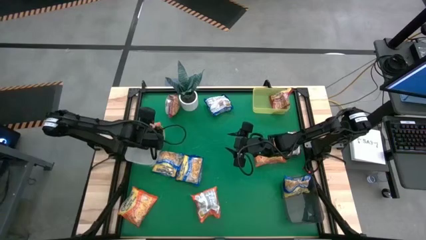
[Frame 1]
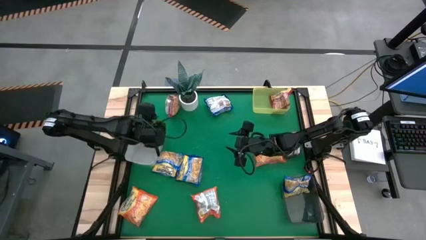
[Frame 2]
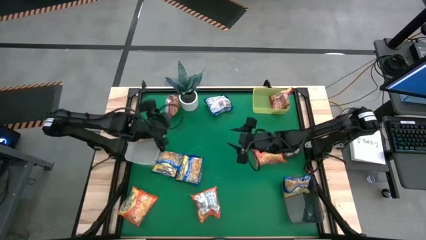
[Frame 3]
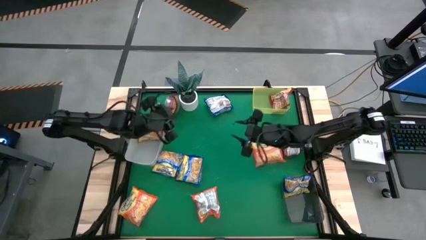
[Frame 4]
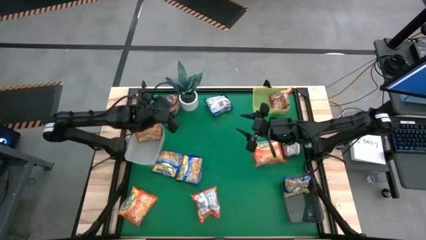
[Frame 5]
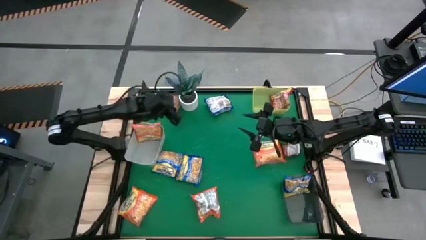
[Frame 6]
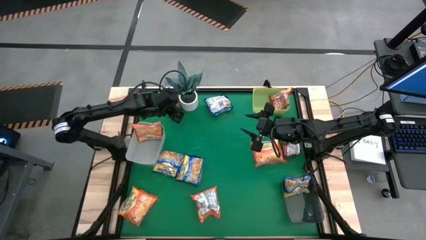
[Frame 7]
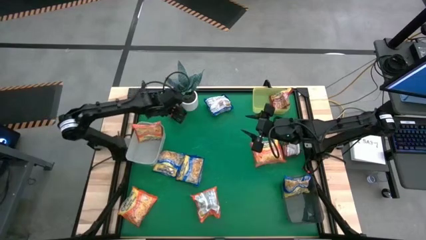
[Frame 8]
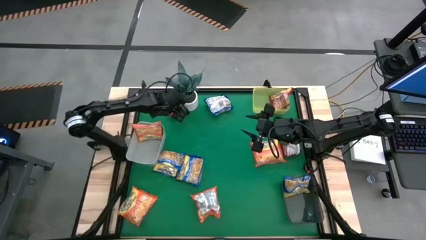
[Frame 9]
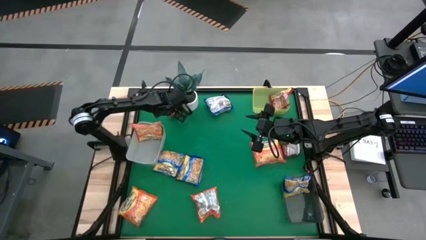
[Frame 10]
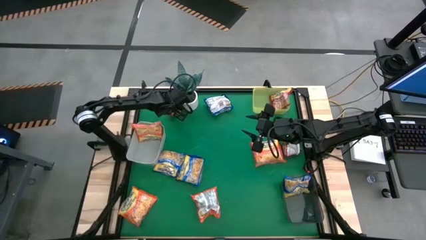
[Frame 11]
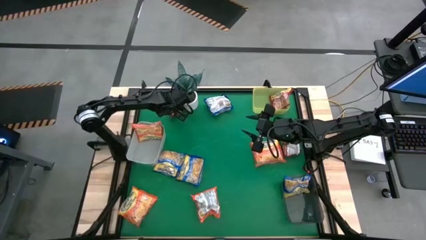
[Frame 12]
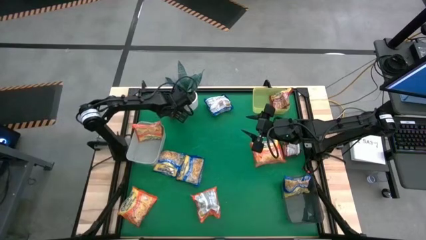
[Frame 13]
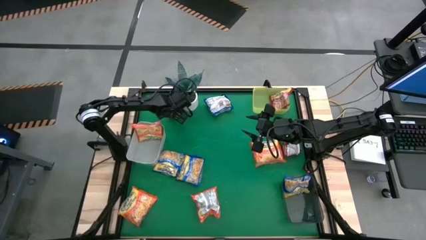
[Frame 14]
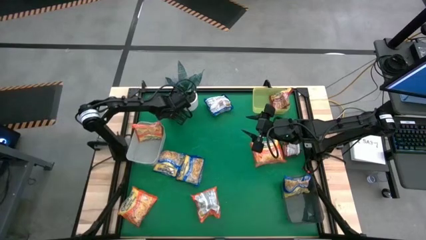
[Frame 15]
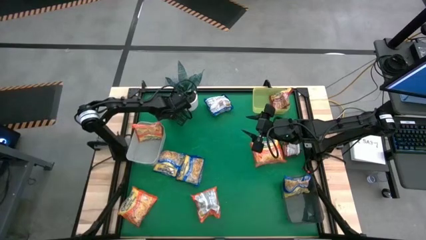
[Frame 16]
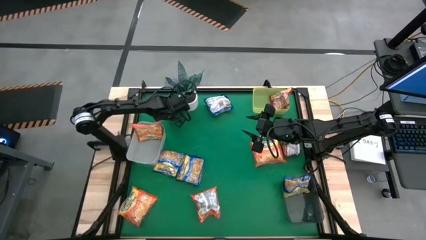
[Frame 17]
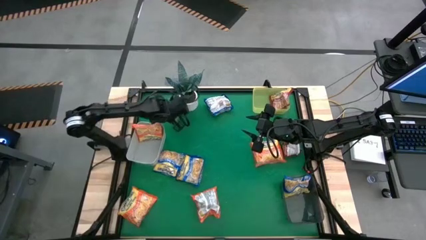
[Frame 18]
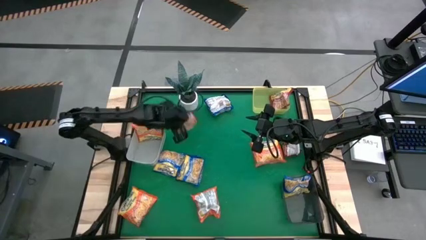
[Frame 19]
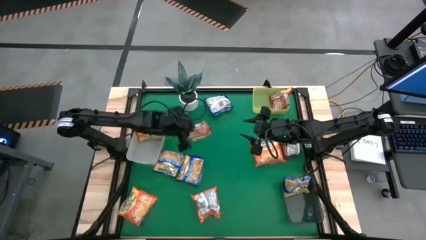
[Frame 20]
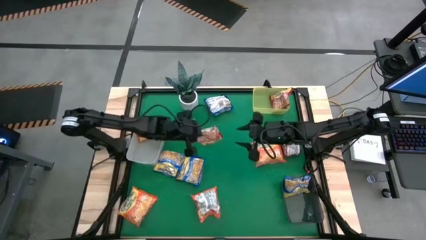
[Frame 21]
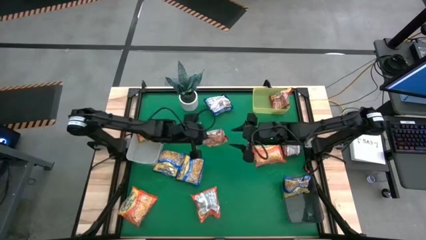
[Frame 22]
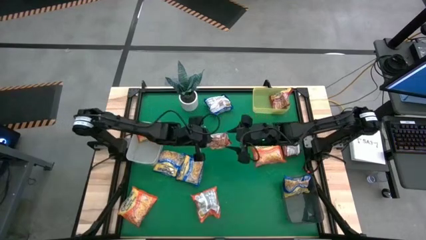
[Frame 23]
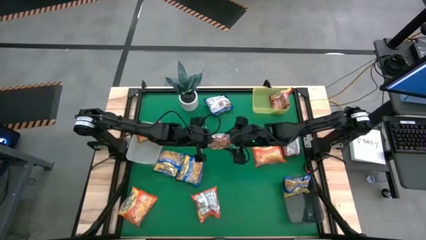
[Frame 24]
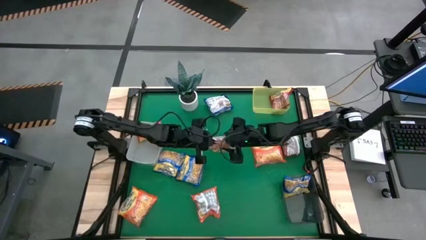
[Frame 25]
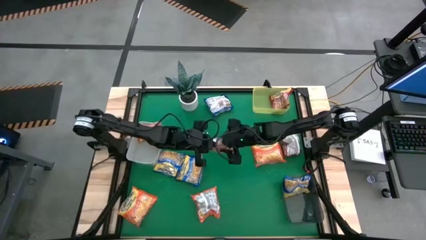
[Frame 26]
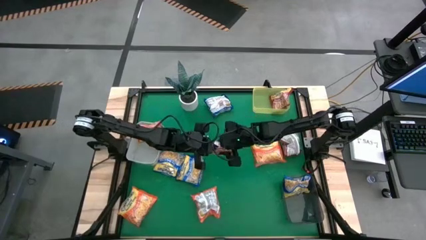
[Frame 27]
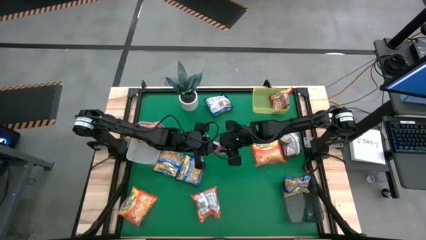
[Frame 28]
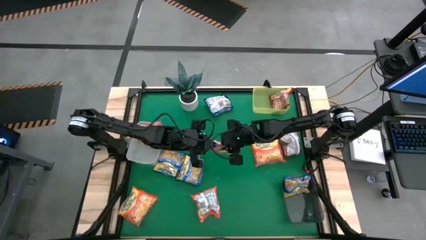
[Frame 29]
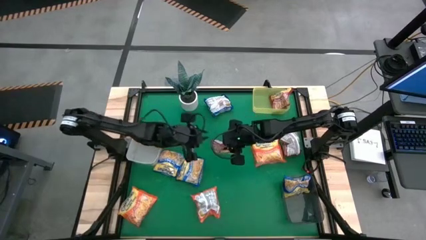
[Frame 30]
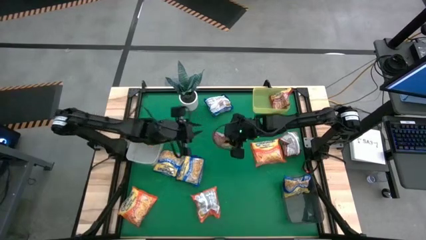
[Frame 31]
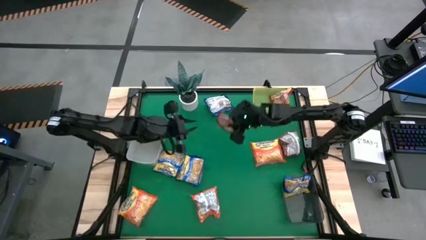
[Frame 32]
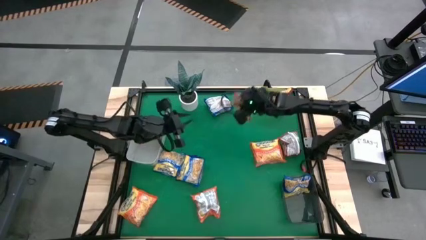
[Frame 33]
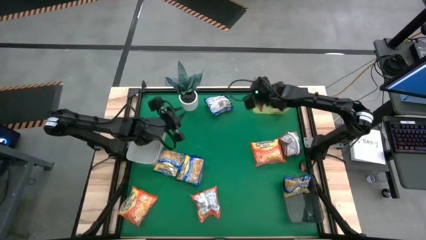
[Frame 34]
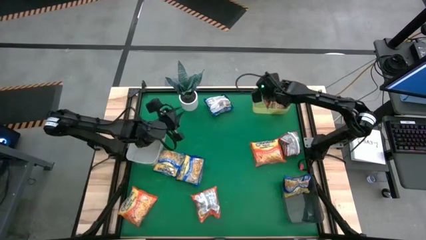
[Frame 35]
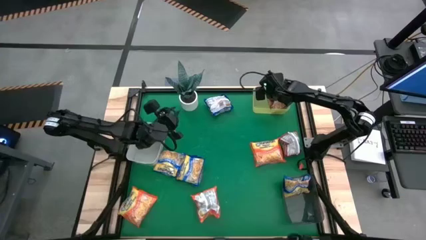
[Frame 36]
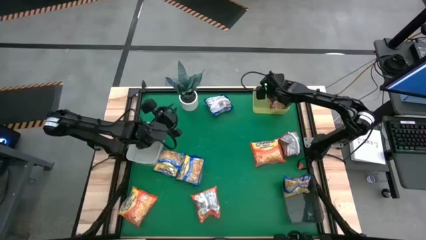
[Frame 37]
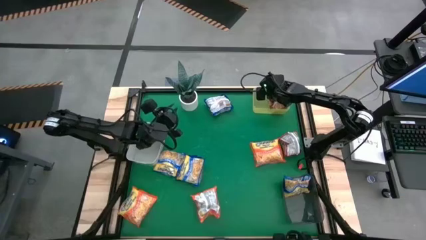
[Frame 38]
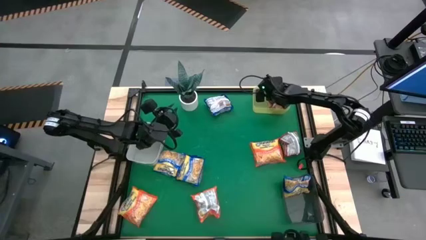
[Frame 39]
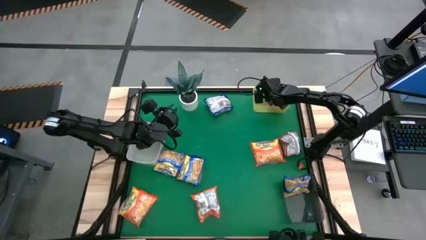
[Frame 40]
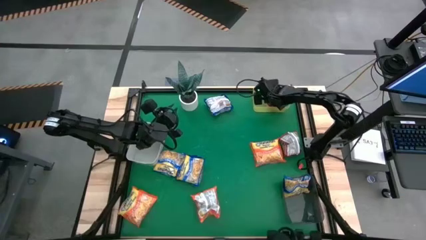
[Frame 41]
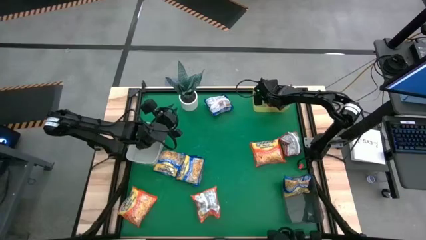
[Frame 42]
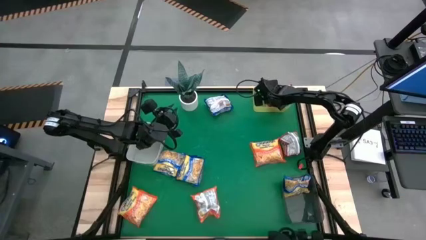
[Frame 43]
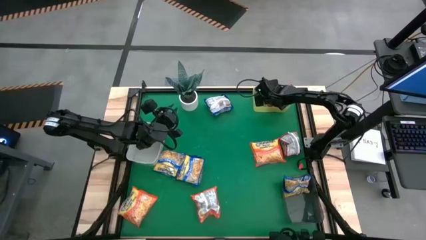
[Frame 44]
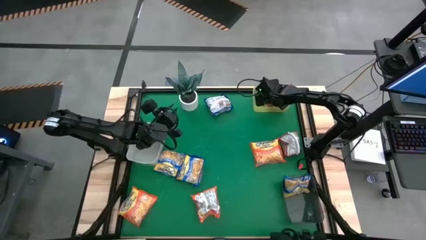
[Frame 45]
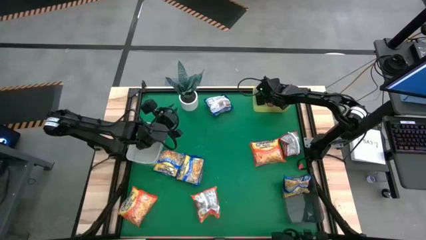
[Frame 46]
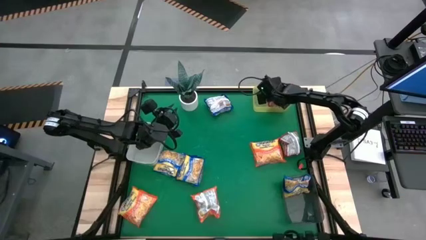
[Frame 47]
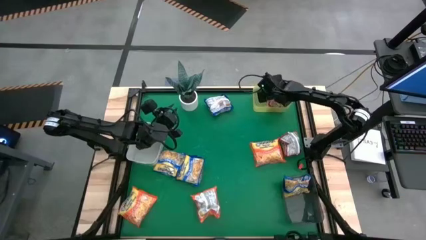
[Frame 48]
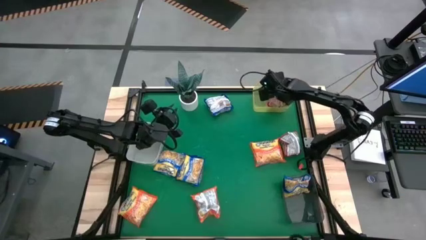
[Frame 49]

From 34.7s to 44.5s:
Task: Sort Maruchan noodles
Put the red noodle pack into the yellow bin

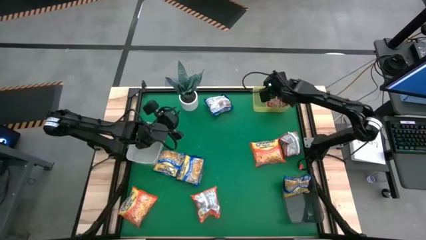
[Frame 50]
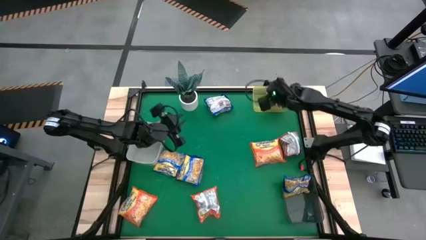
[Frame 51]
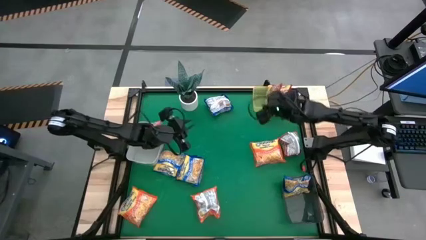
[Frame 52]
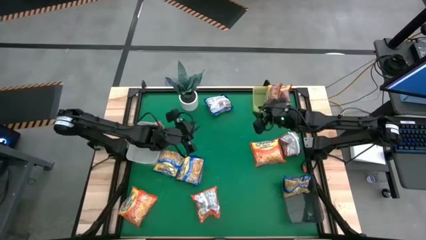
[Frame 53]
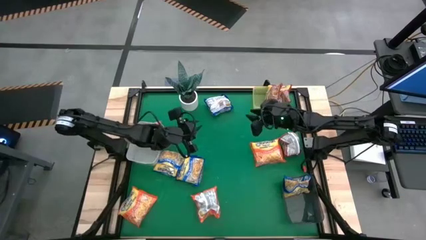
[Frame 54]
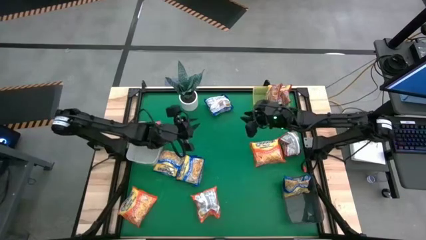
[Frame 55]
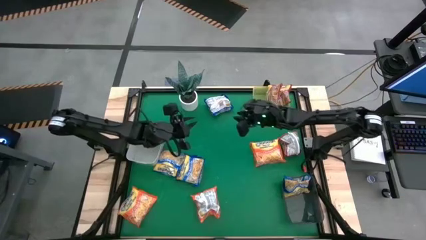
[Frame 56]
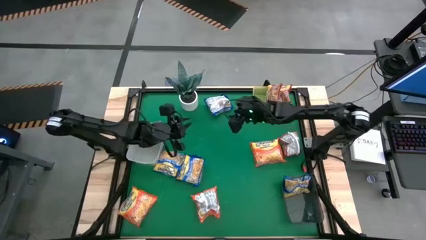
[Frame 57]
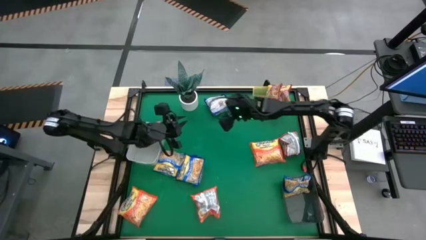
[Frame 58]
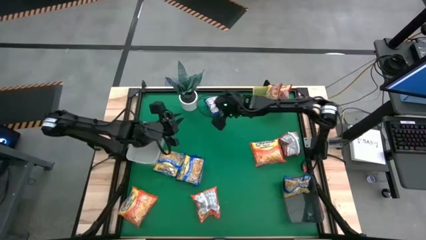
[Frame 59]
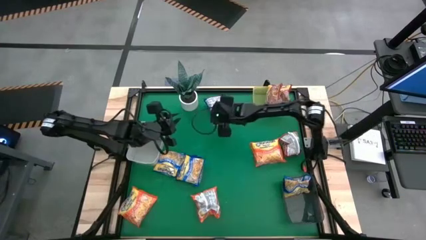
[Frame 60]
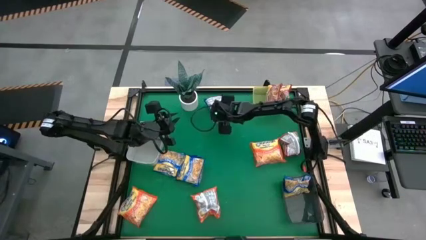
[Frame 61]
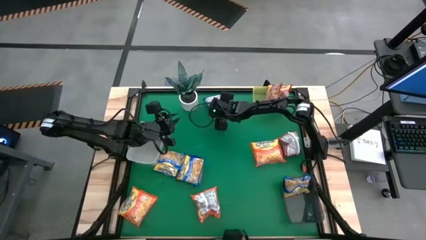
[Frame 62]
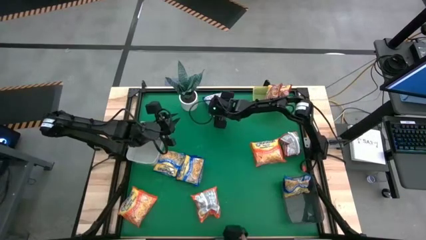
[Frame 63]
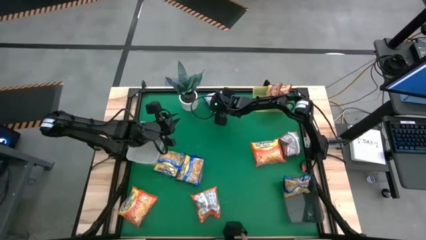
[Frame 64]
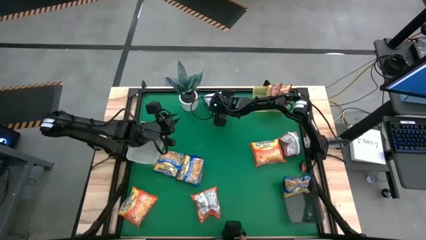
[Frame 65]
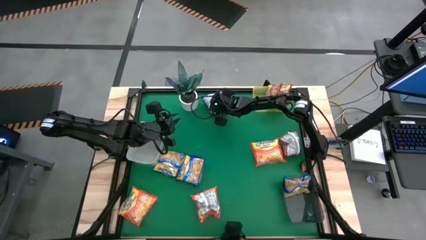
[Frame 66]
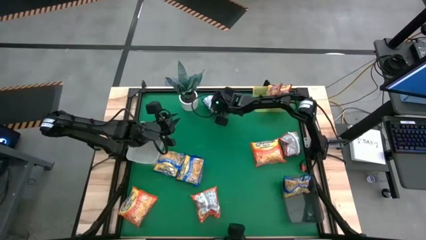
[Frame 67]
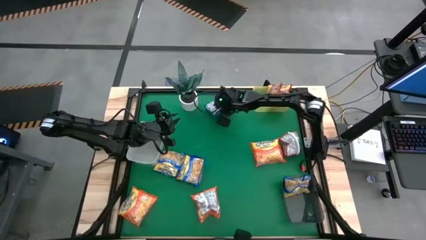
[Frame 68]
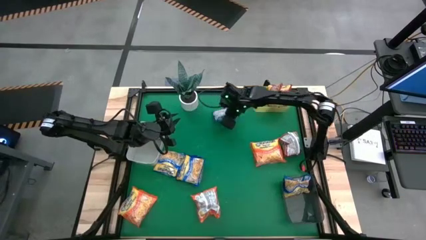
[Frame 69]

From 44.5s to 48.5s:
Put the blue noodle pack into the black bin

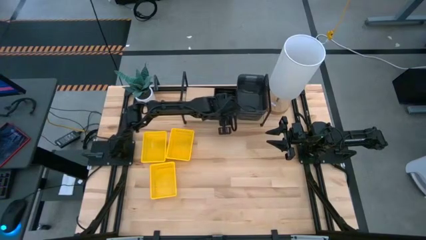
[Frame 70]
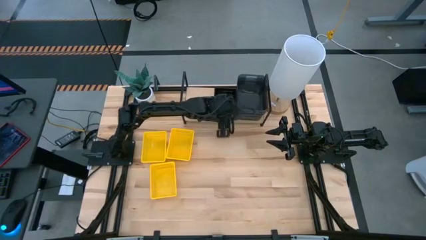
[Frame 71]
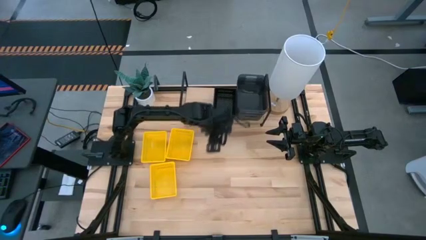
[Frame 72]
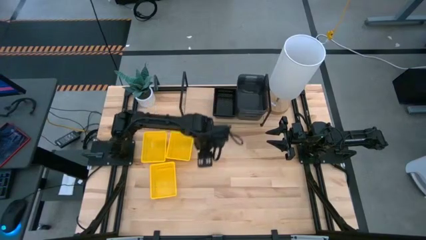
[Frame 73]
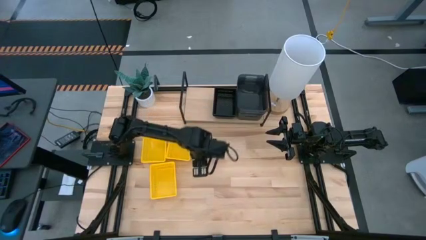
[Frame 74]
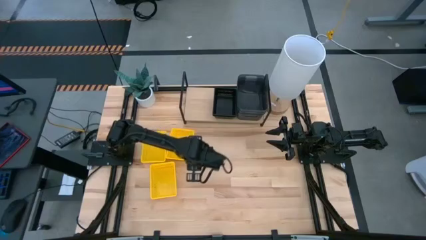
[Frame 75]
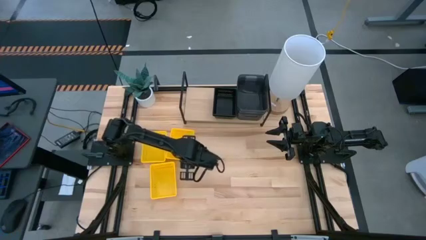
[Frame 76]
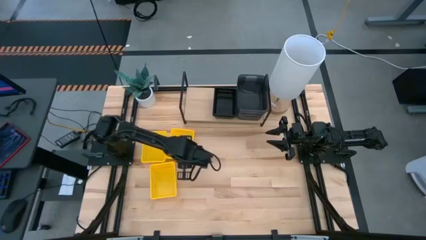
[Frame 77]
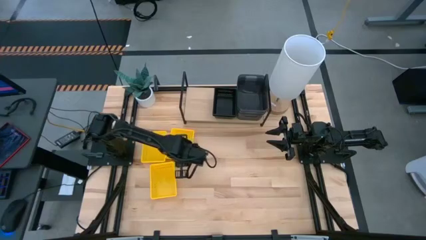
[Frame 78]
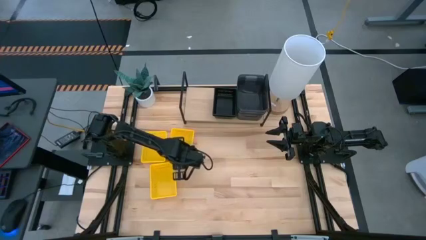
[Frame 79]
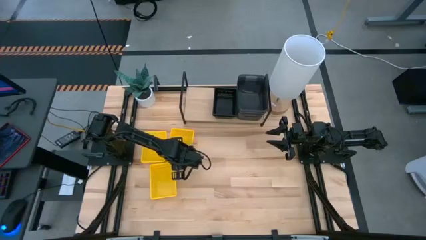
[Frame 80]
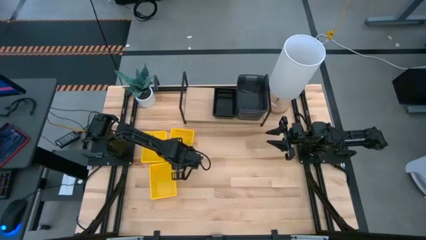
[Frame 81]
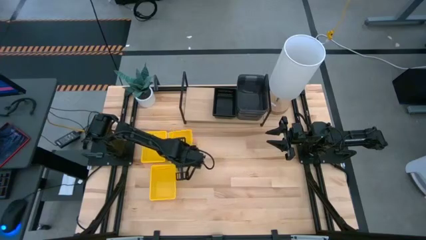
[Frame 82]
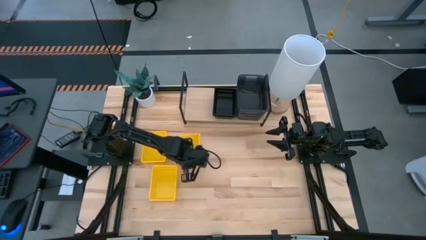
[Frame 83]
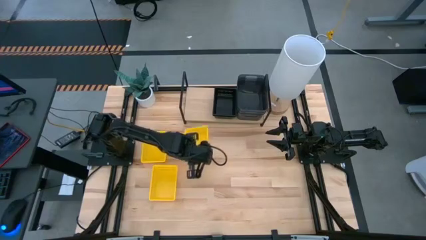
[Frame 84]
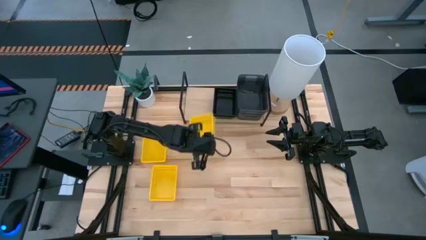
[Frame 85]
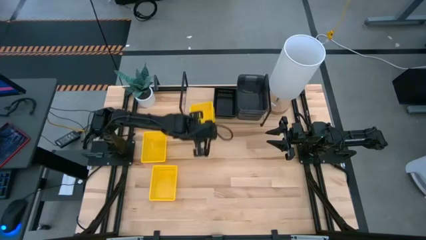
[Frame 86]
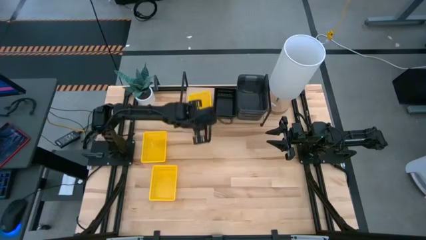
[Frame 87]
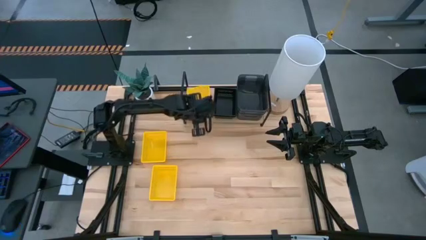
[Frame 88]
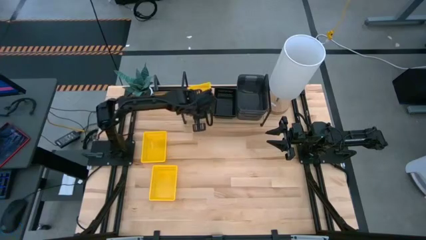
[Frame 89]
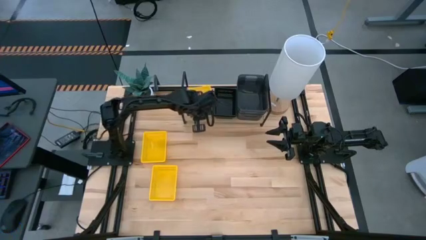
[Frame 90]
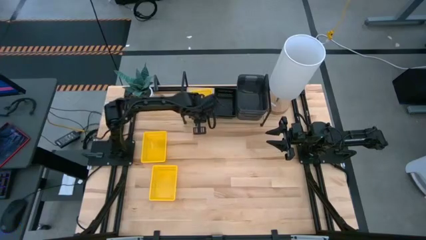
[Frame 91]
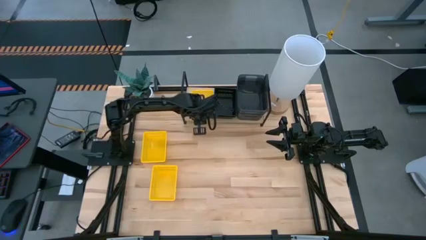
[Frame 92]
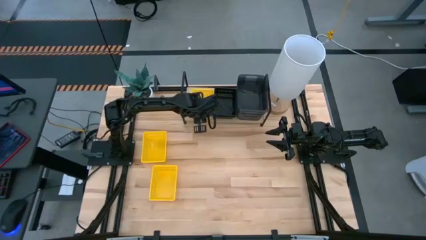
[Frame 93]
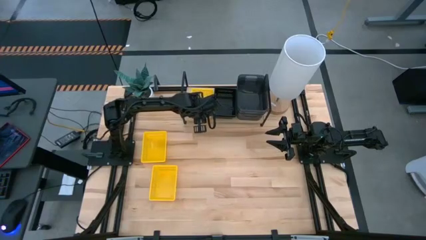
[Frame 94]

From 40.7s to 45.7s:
Task: Stack baskets on shelf by color
Put the right yellow basket on the shelf
